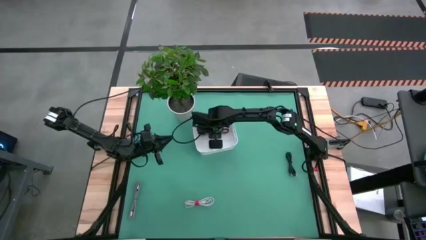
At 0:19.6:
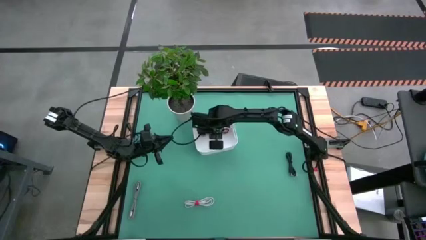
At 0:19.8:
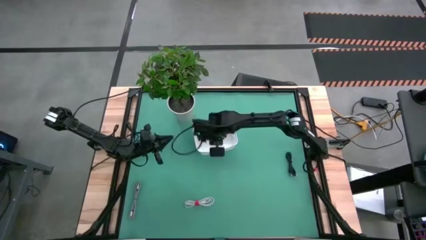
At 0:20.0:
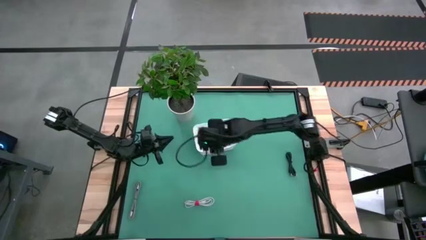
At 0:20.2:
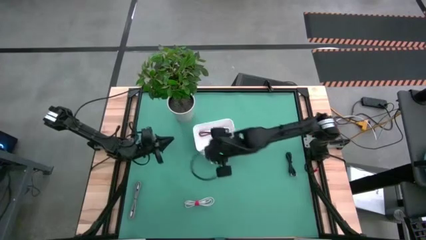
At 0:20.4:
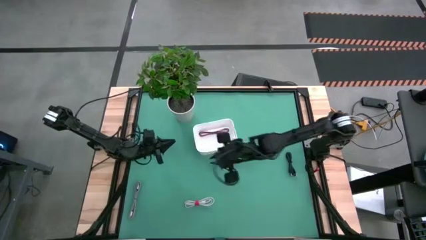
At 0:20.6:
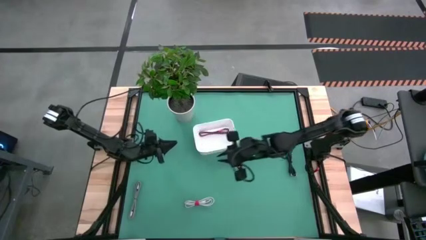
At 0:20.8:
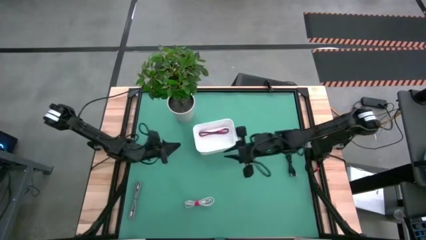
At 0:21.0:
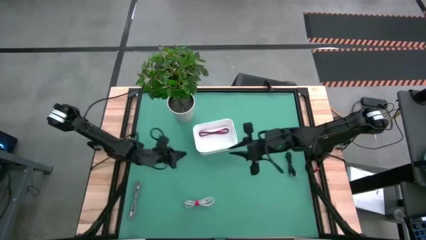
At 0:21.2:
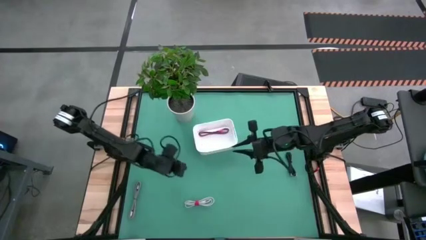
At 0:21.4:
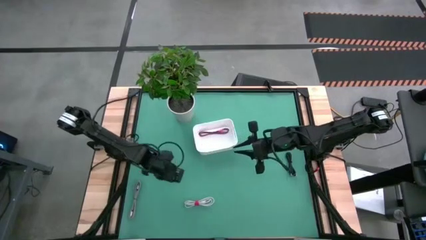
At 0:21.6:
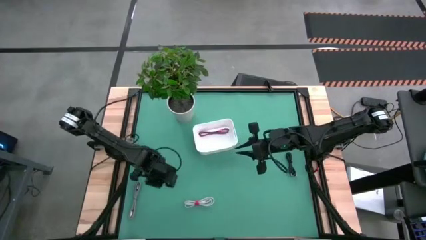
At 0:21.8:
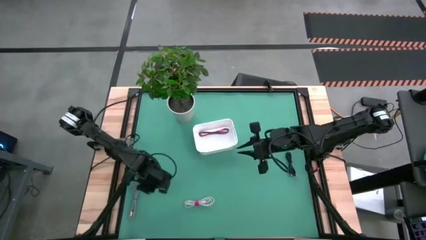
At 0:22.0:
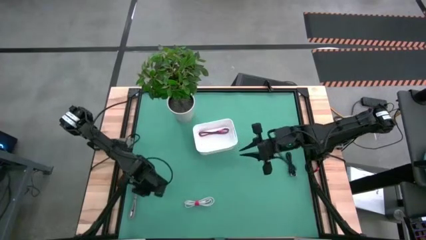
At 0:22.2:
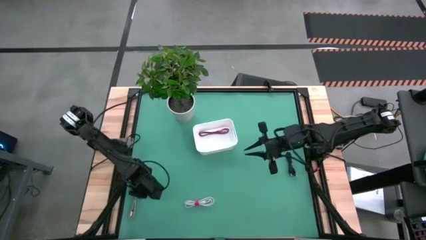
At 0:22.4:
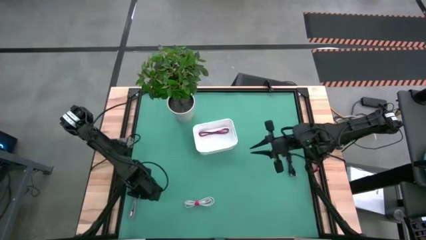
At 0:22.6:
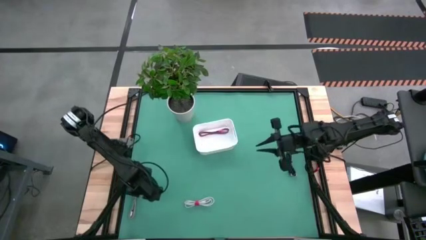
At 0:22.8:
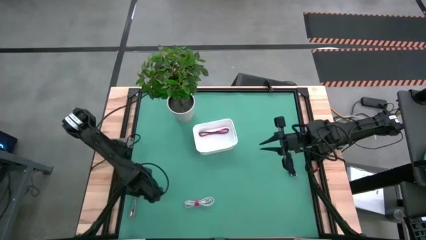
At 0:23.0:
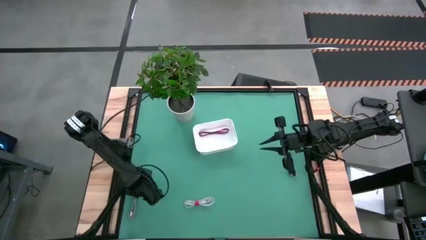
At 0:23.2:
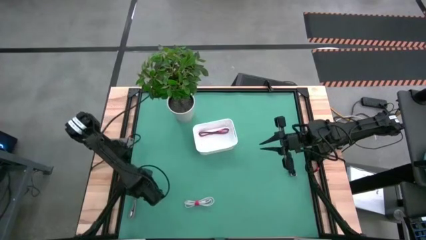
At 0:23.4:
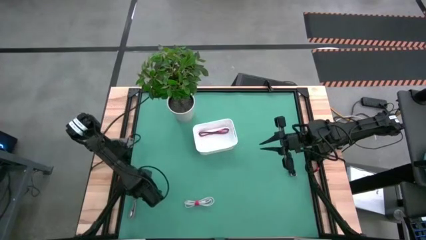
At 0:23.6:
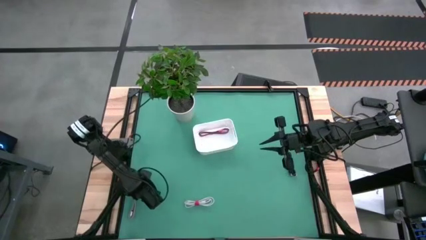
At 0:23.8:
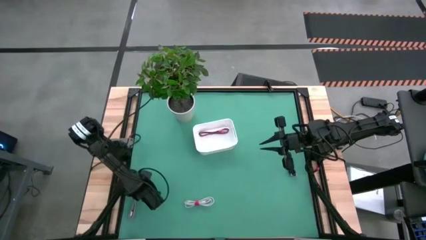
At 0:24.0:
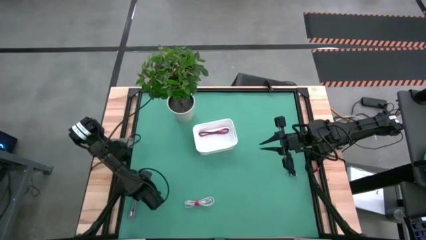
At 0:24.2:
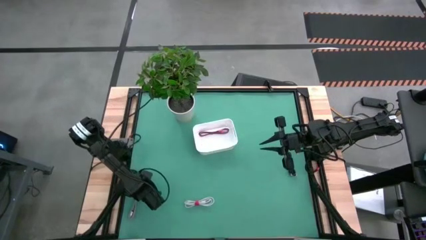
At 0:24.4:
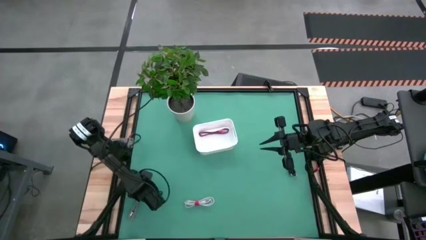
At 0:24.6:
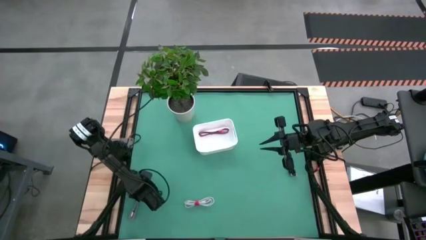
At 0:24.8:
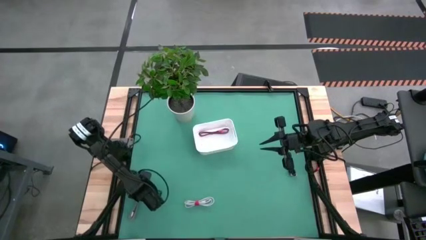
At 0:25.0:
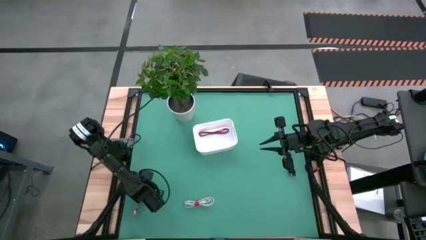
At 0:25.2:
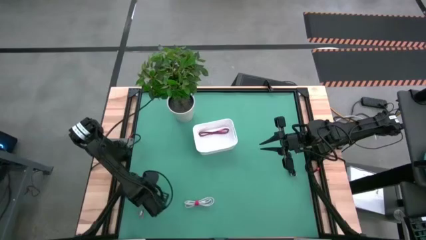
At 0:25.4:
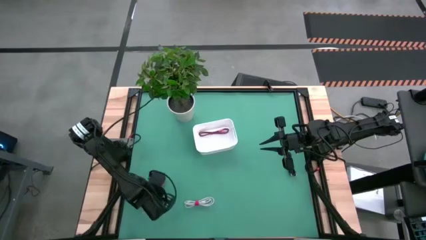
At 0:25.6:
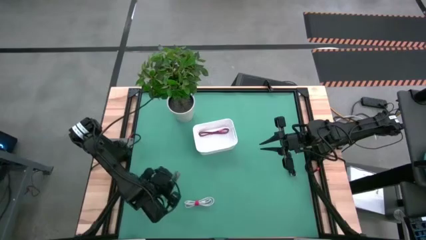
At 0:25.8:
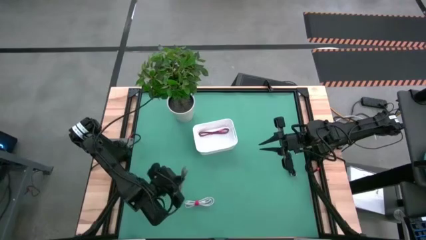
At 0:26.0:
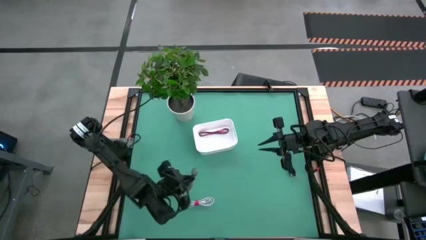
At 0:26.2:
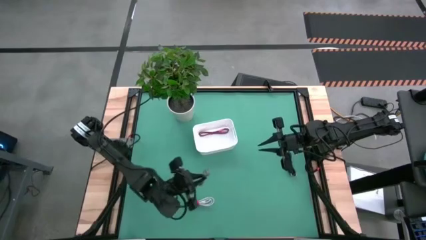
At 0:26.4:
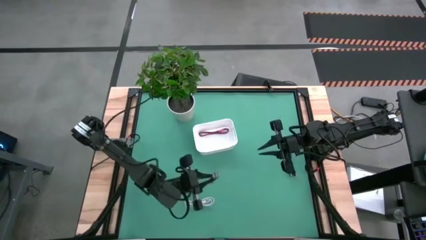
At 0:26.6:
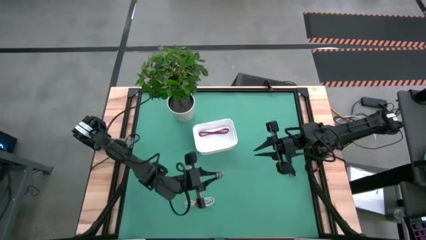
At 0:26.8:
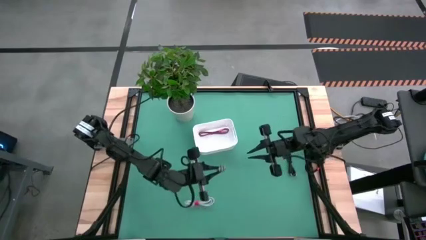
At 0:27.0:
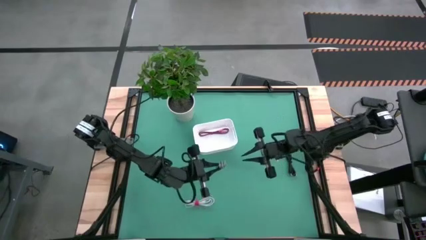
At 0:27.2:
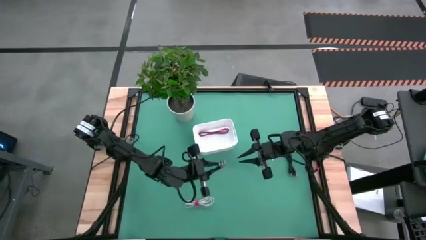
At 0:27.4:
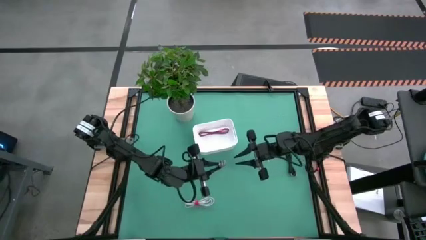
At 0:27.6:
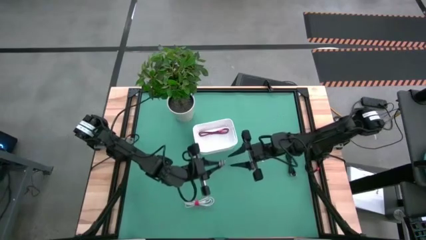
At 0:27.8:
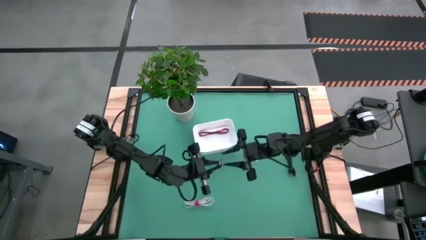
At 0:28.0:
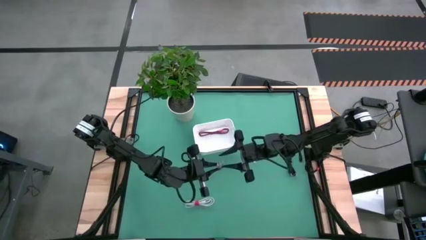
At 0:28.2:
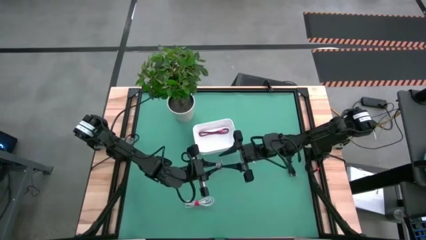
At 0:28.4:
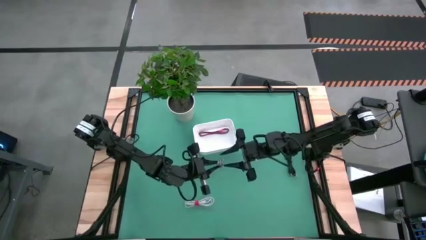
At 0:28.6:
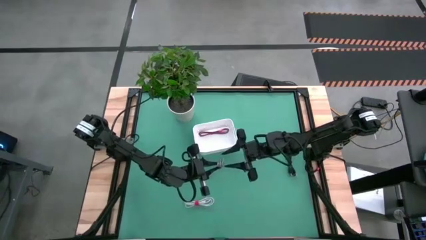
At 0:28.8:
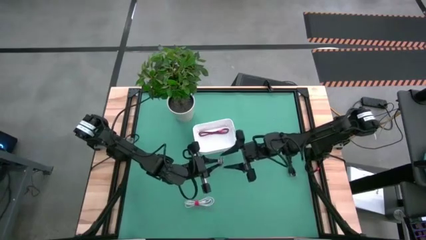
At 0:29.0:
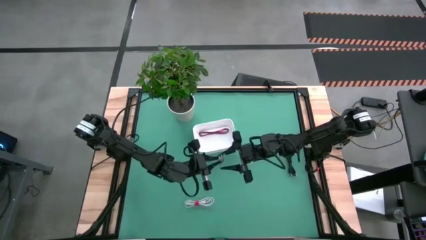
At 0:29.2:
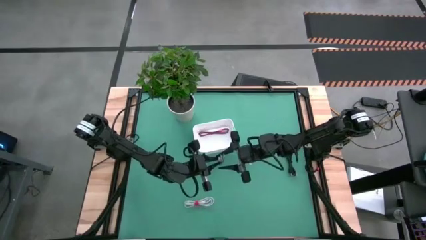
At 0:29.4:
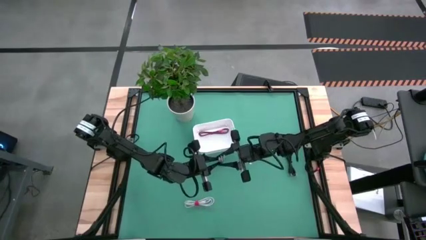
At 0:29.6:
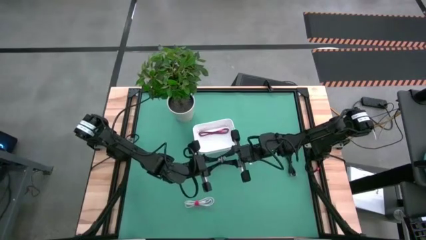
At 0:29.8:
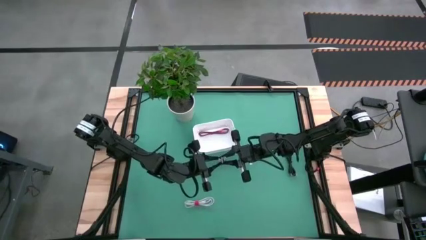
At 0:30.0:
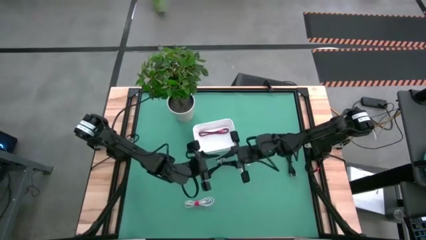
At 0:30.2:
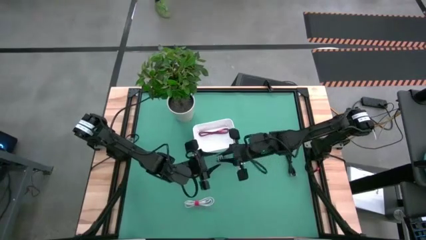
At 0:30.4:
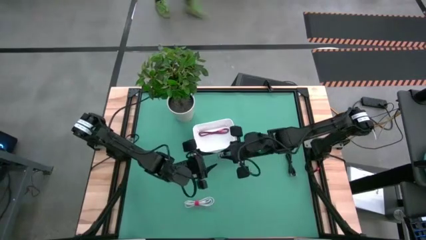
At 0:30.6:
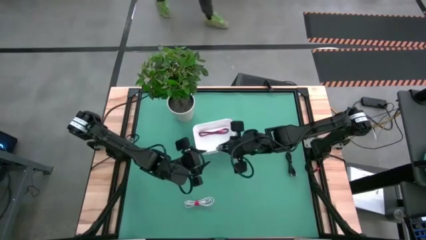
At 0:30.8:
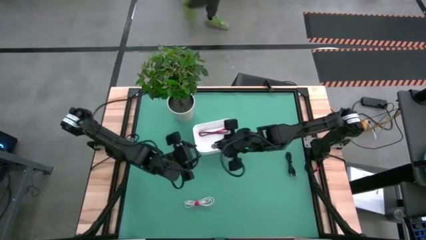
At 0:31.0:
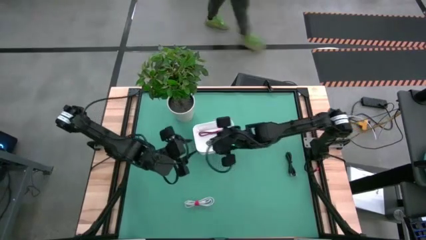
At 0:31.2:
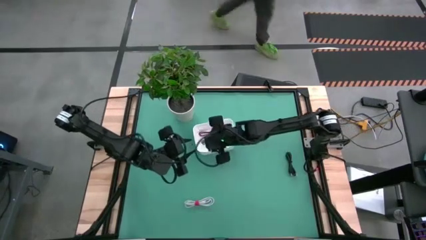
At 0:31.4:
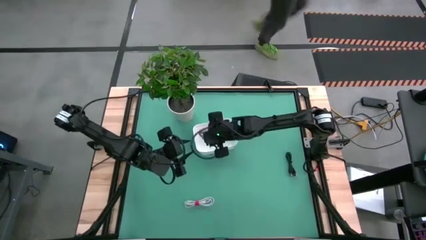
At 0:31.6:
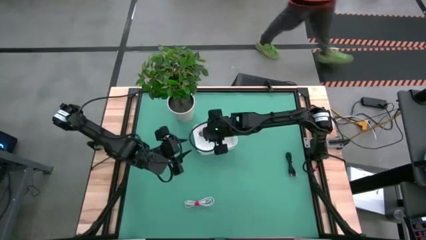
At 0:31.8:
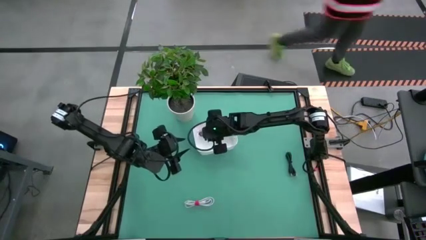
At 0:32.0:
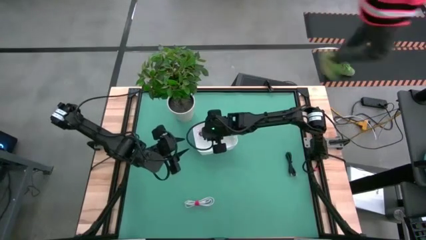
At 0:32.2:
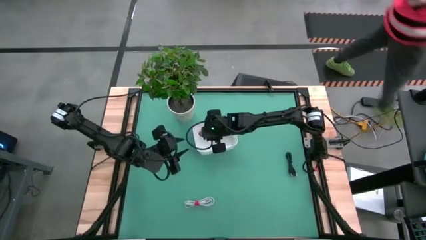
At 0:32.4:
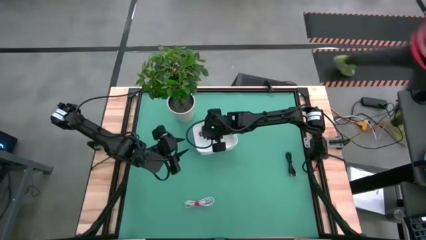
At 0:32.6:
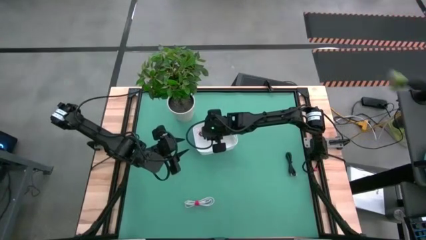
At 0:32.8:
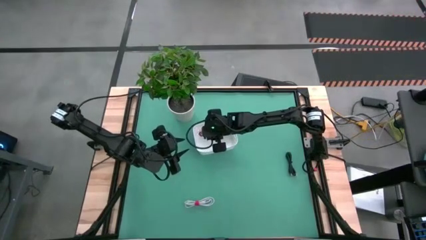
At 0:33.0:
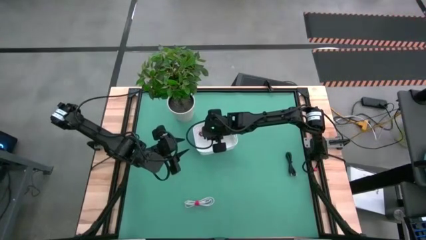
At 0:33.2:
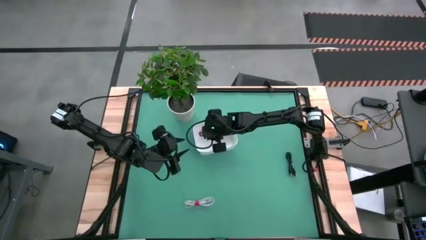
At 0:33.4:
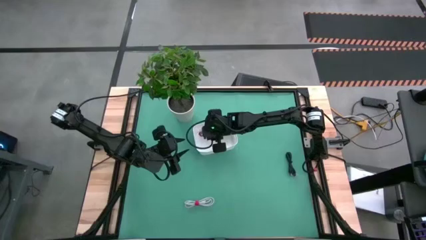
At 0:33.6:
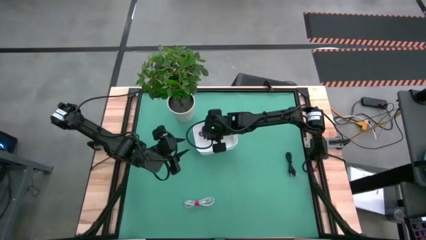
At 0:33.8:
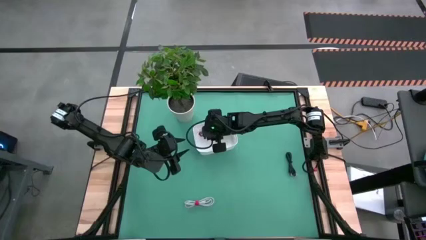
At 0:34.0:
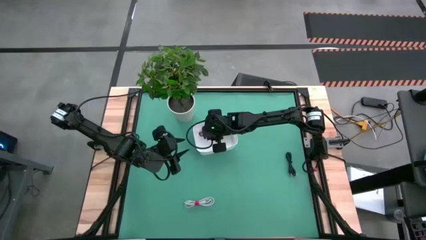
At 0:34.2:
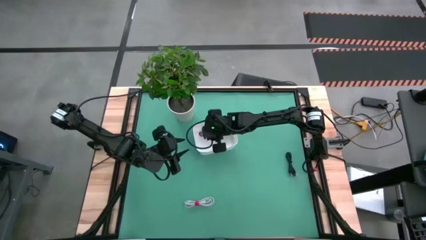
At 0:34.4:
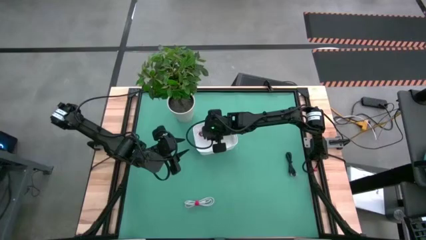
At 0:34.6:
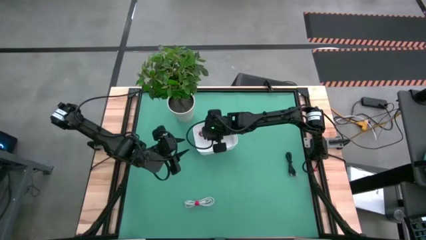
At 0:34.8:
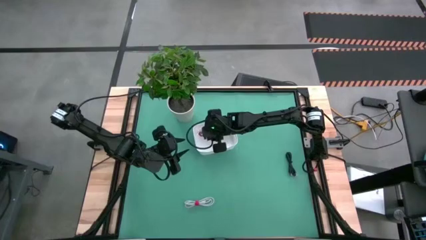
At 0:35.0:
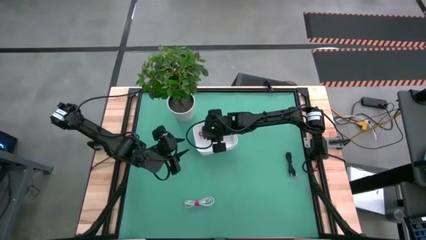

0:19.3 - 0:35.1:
Task: Pick and place USB-C Cables
Put the white patterned charger cable into the white bin
